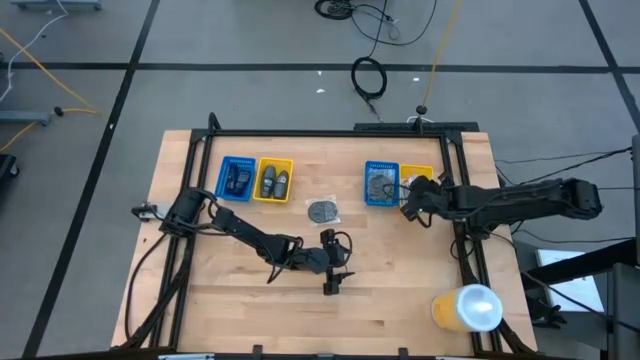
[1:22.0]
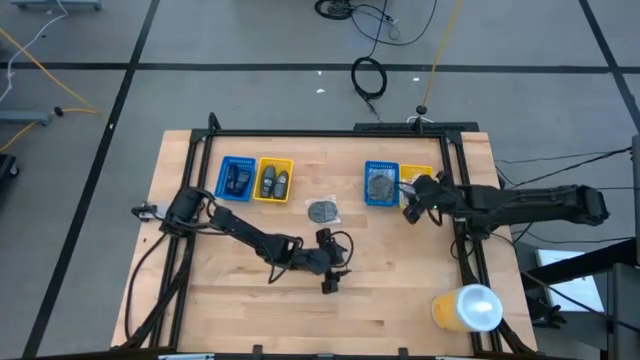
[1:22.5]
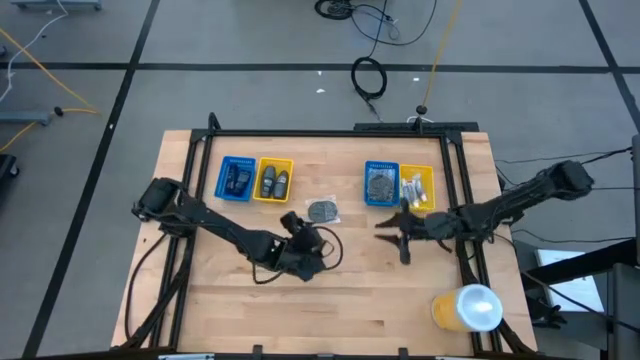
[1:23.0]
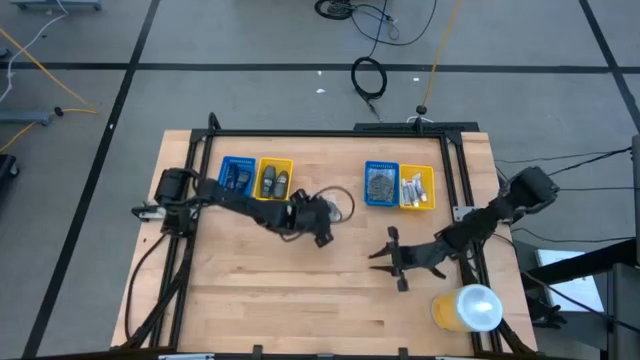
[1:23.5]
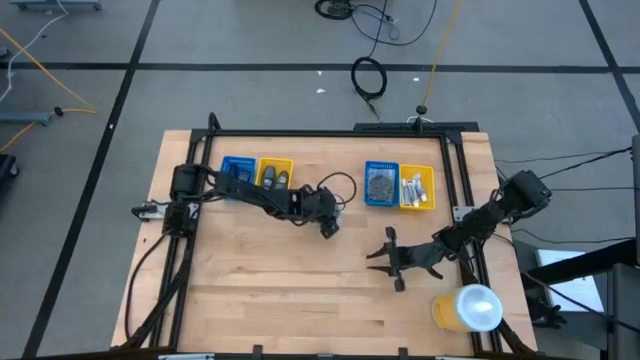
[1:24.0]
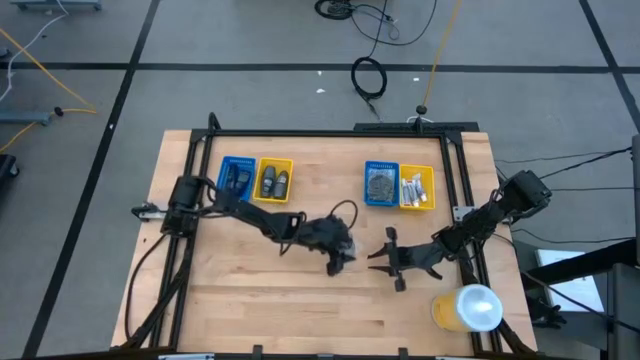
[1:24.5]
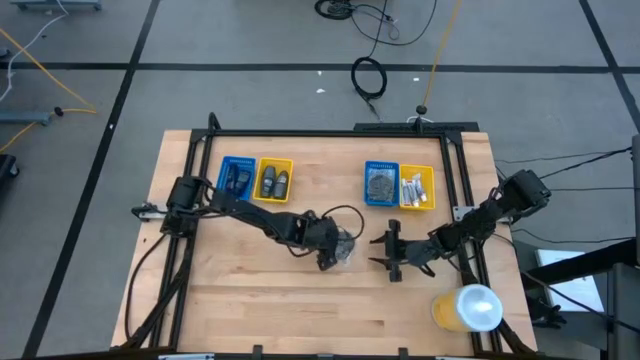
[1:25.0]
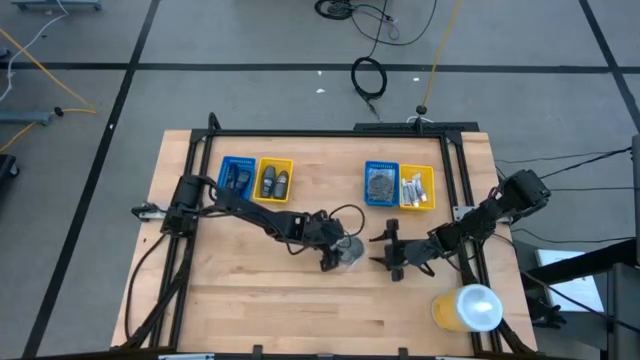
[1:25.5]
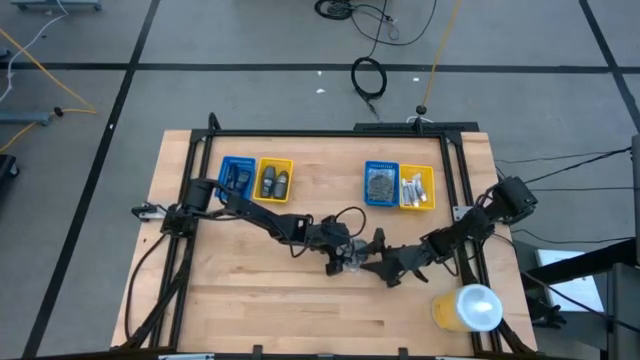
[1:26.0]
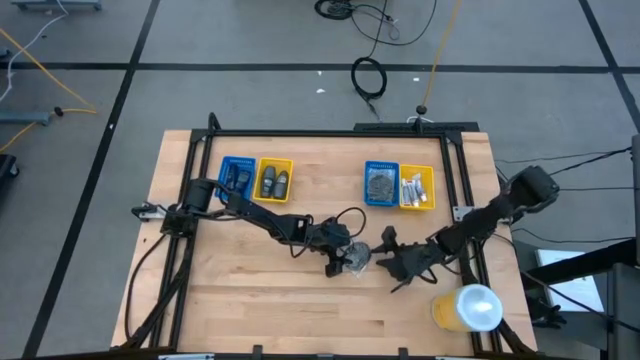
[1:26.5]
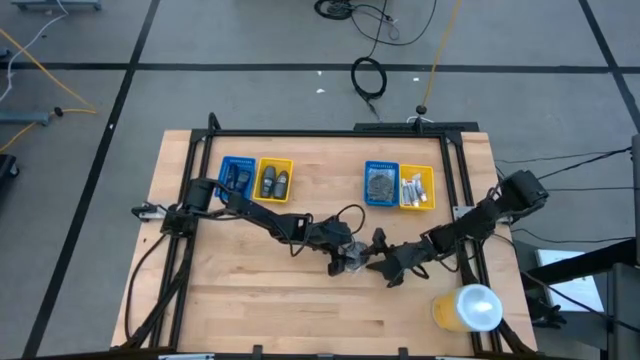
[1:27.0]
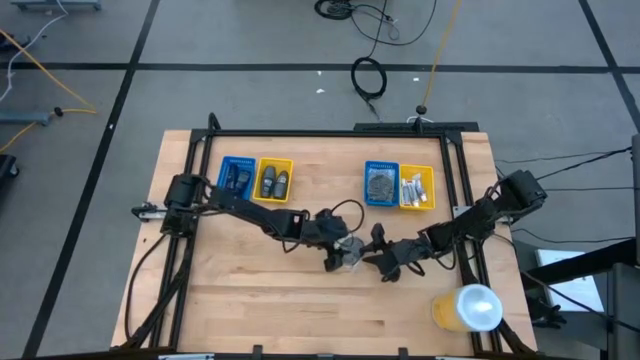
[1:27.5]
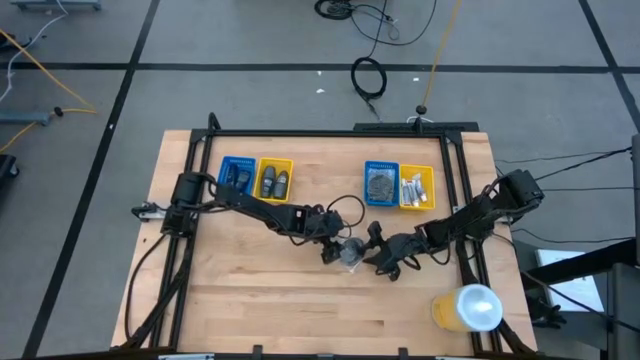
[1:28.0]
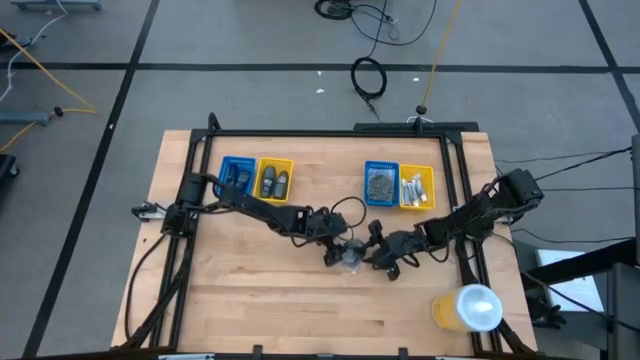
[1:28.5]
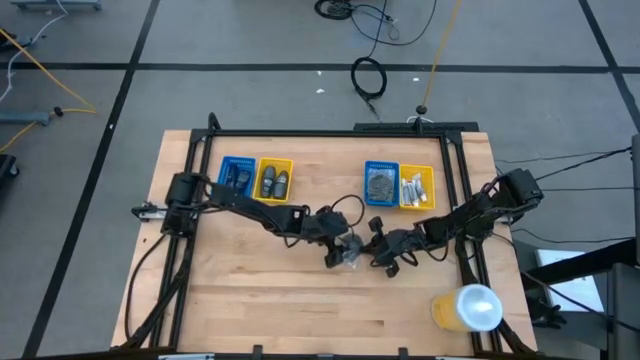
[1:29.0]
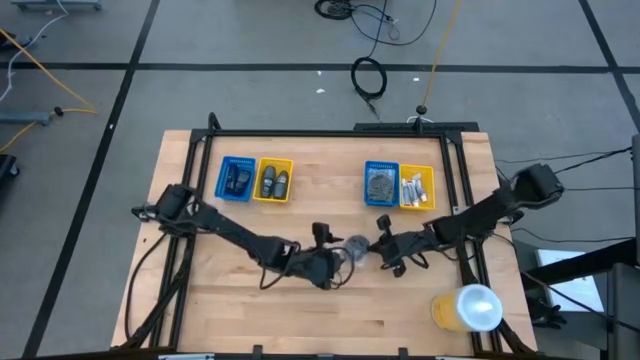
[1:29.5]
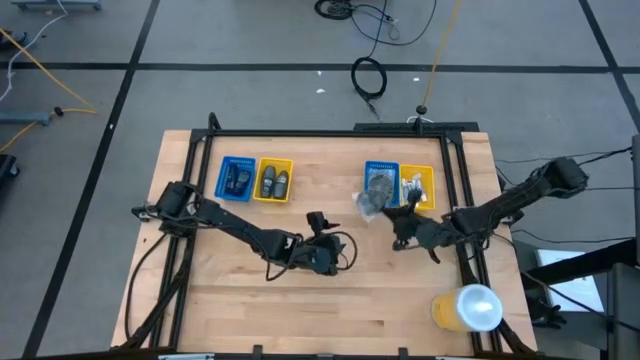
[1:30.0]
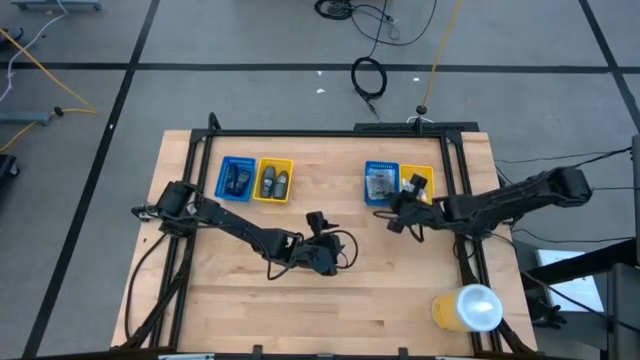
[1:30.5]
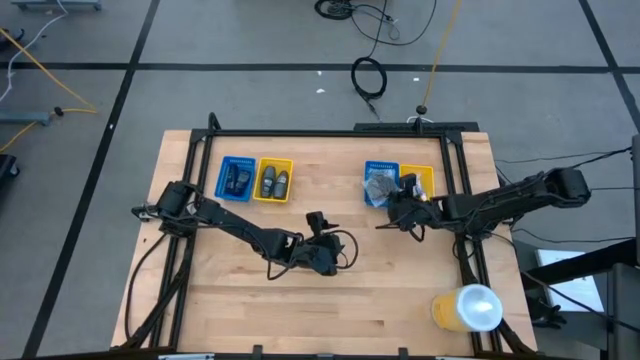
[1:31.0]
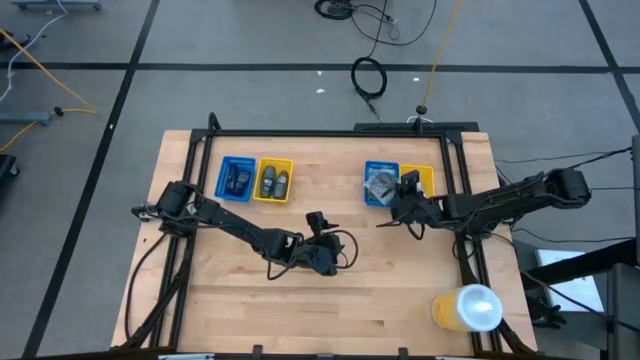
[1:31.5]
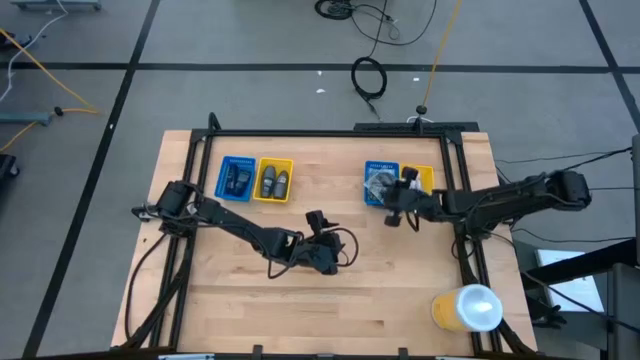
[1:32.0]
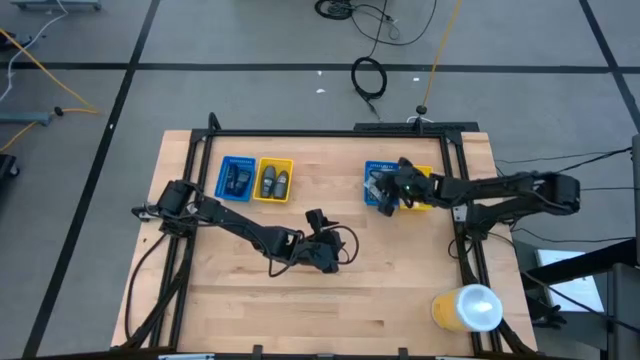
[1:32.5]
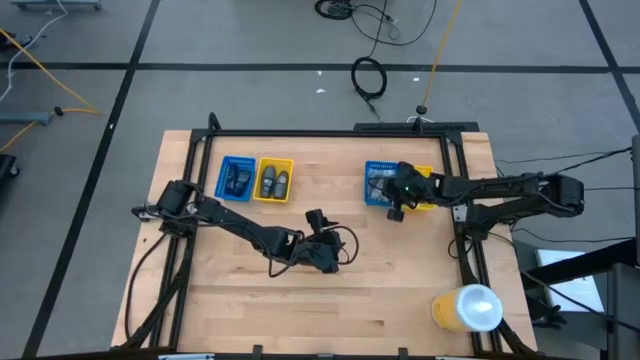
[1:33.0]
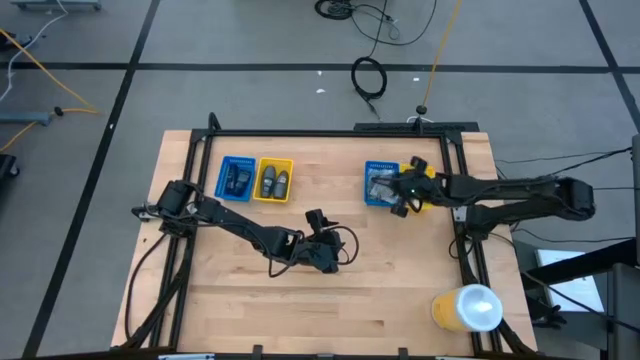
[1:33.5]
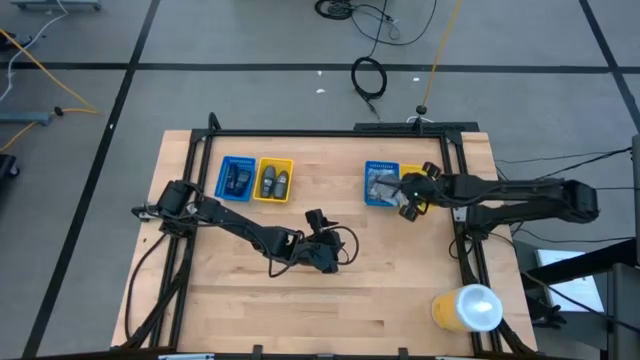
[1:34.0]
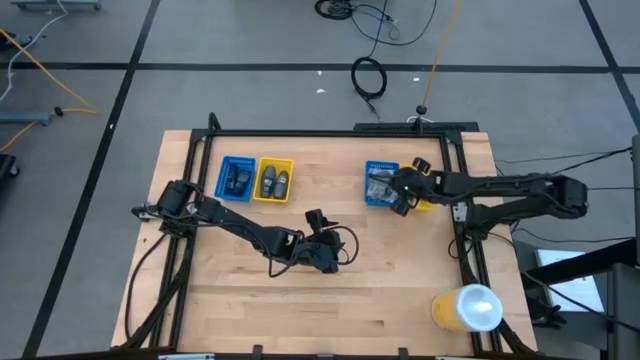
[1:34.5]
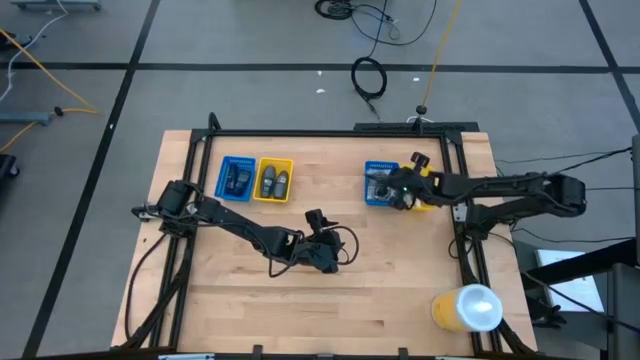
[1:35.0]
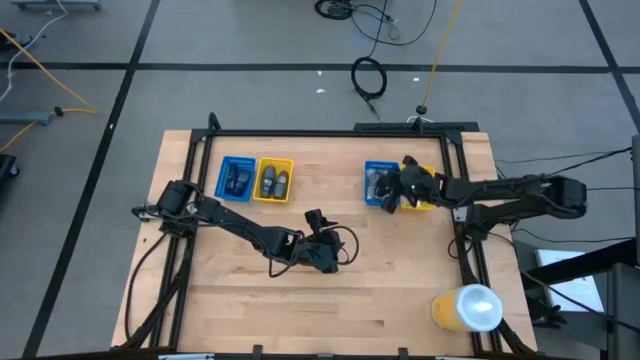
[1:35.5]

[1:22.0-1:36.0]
Task: Pick & Place Travel size toiletries
Put the black hairbrush into the right blue bin

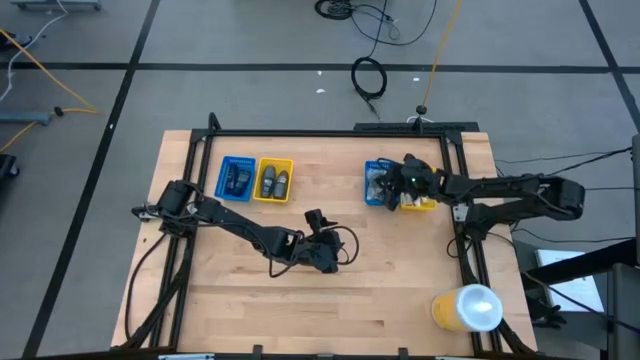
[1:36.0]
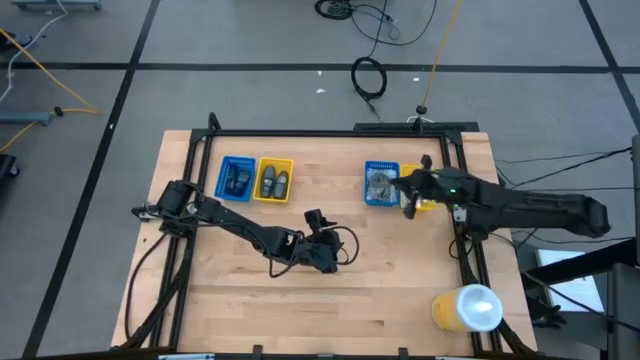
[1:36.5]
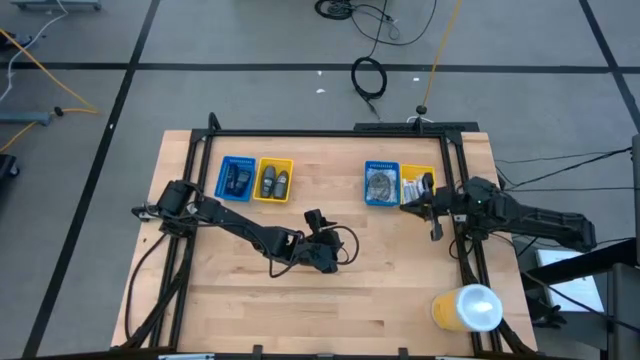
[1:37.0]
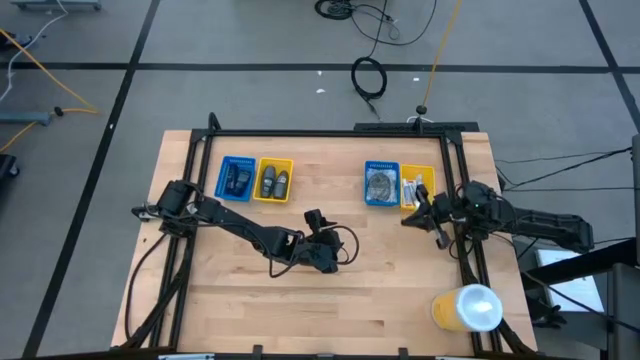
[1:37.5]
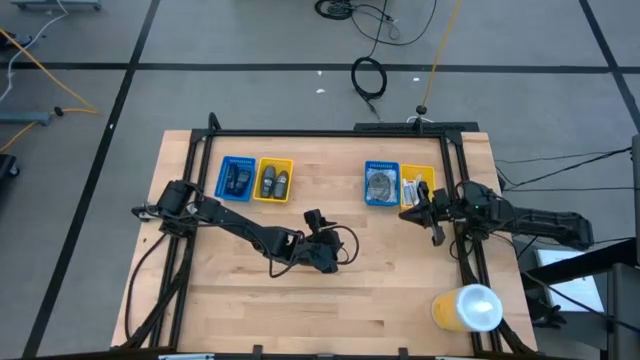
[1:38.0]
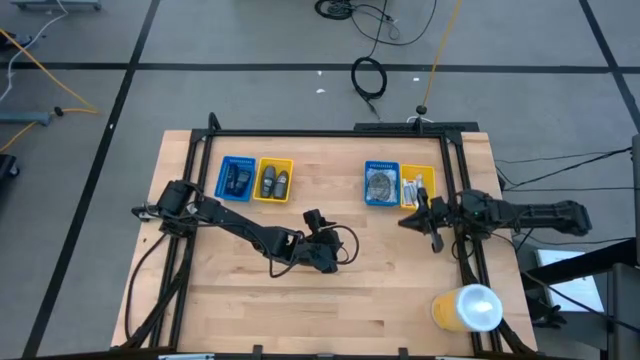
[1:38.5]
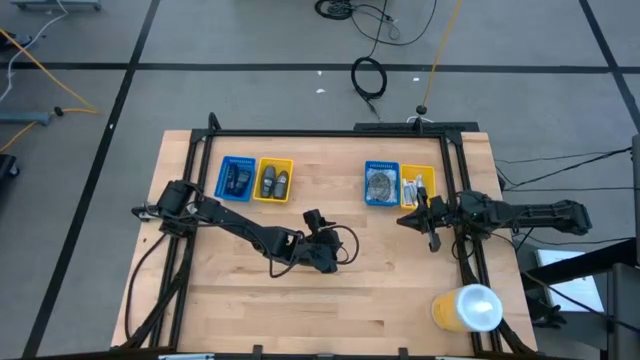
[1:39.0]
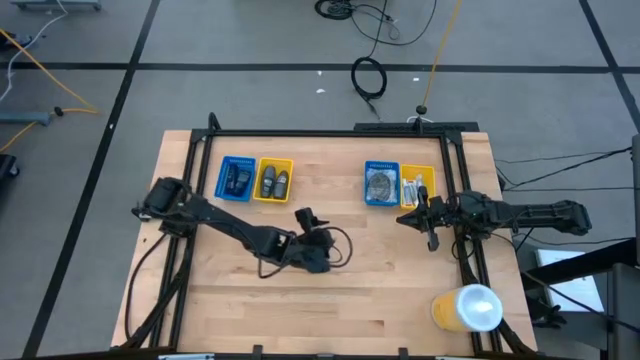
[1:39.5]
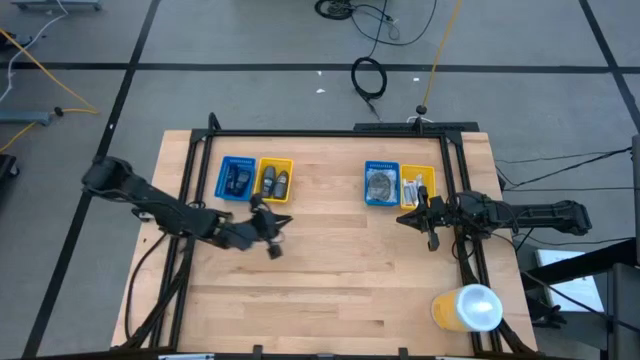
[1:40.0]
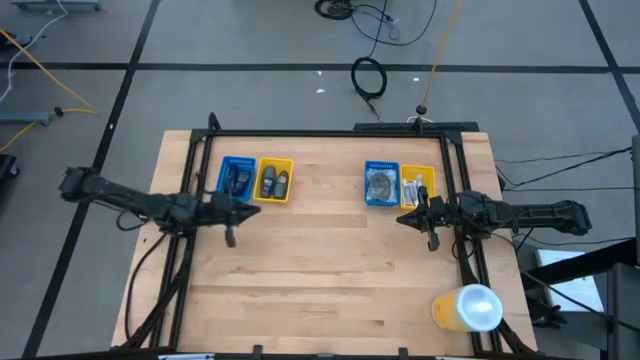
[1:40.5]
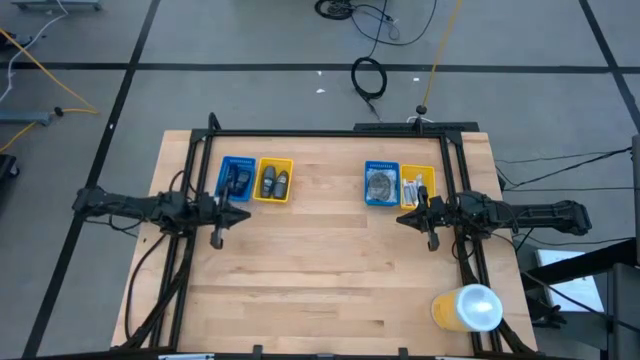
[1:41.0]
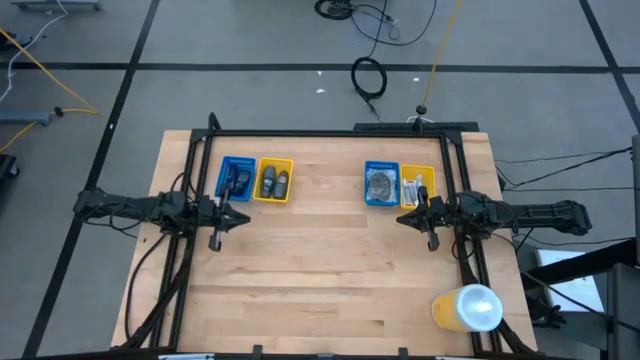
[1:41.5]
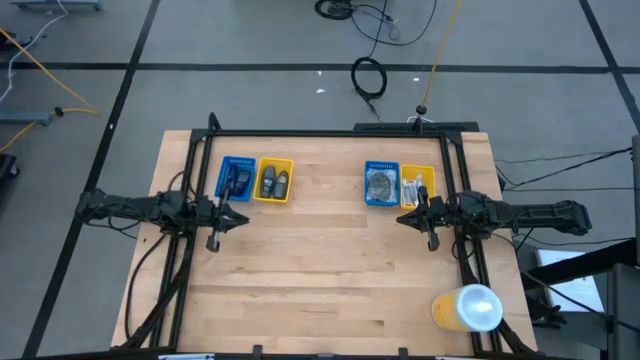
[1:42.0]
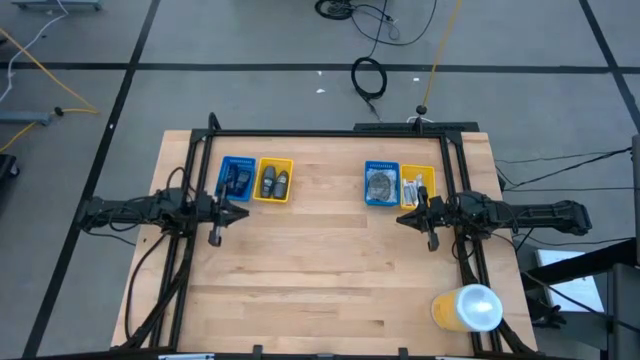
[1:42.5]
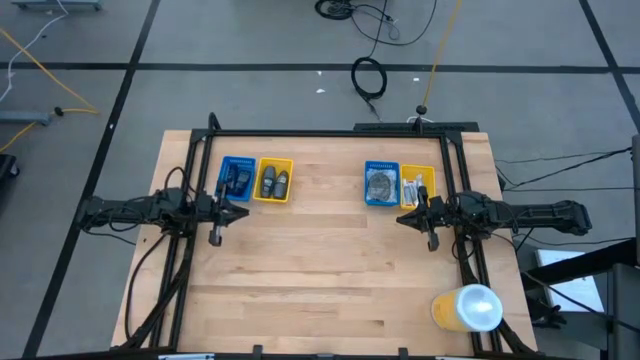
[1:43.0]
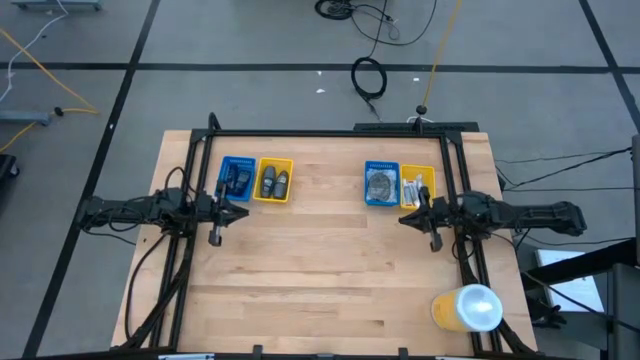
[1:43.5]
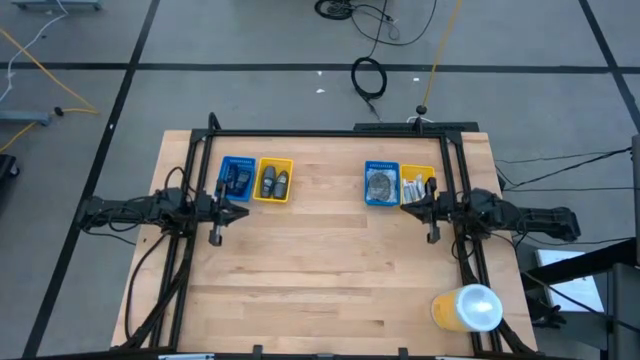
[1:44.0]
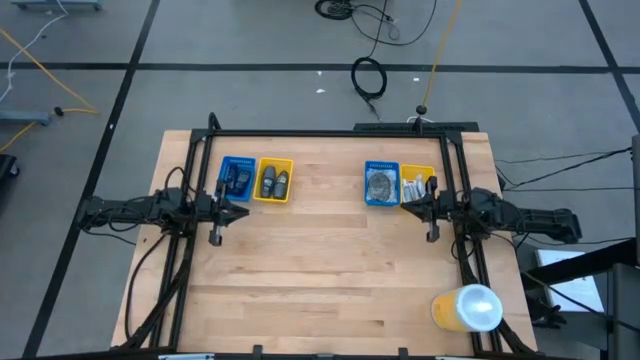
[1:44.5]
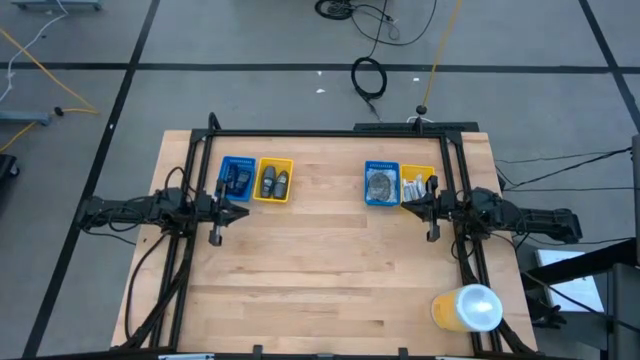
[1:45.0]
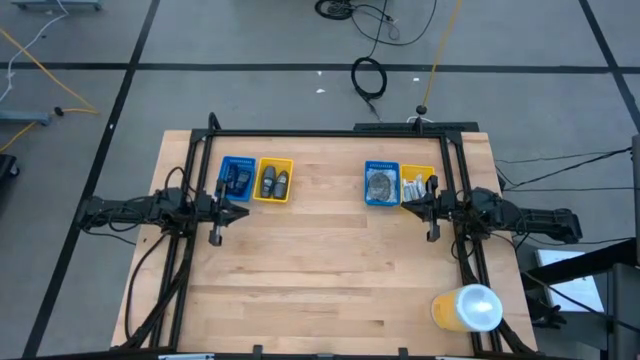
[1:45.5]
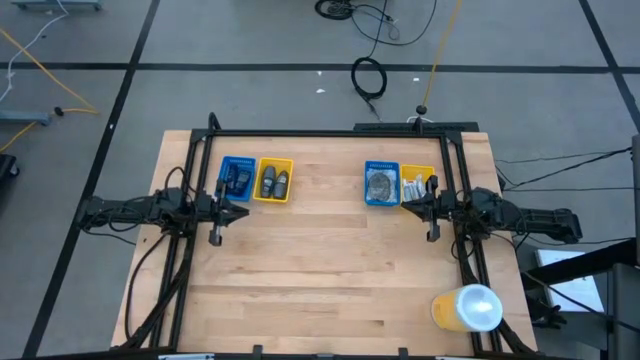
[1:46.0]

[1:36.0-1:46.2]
Return to Home Position
